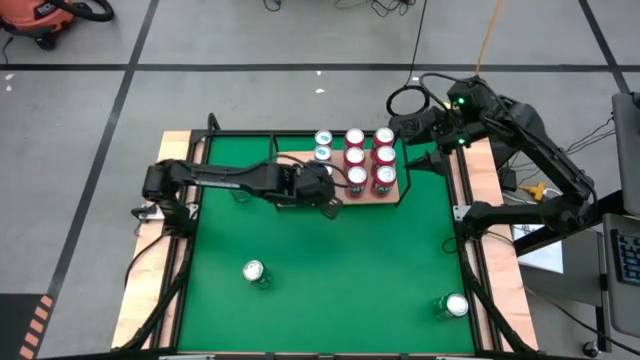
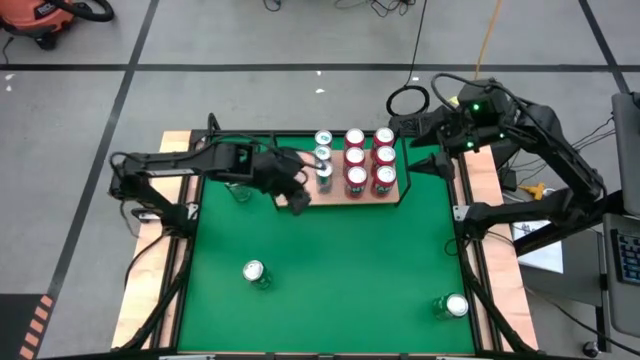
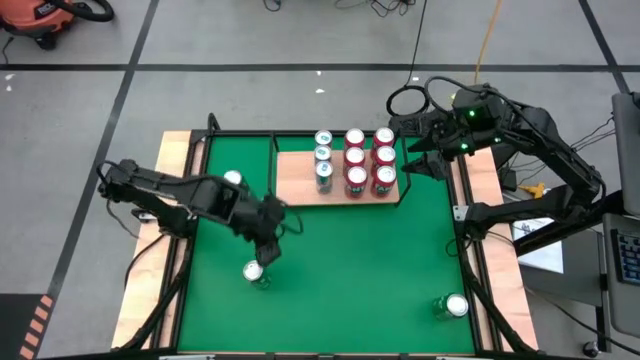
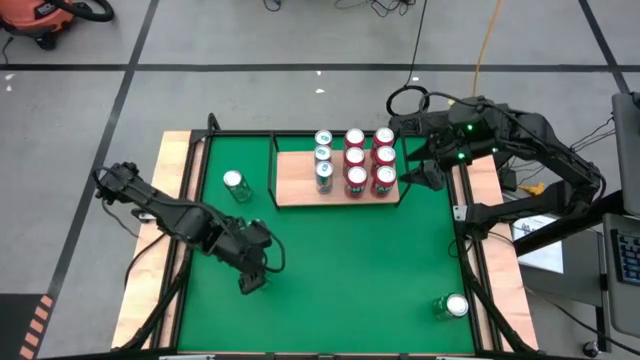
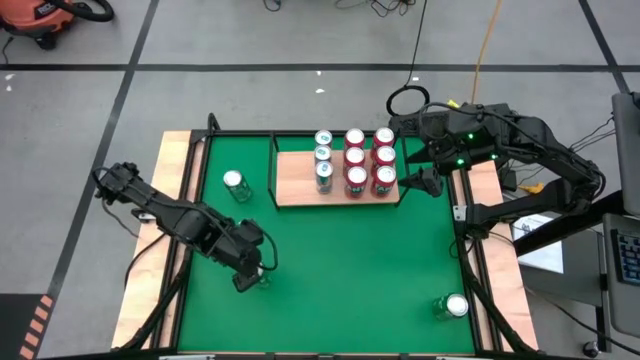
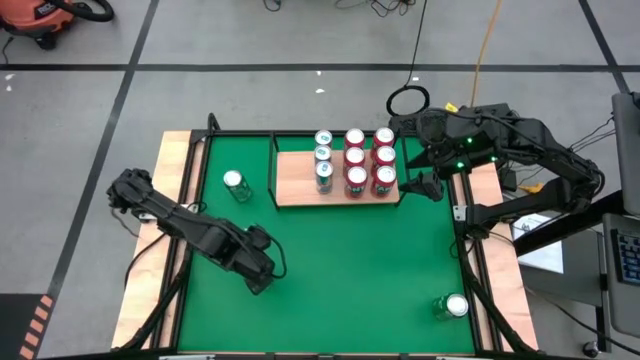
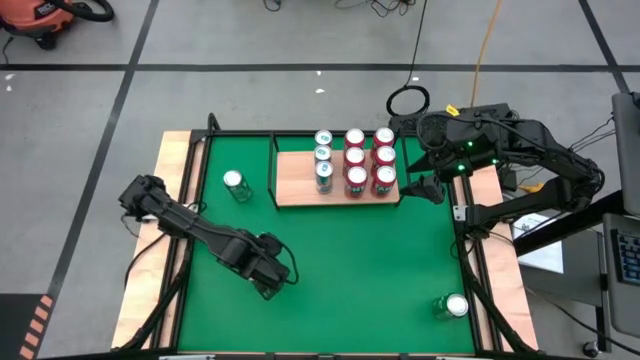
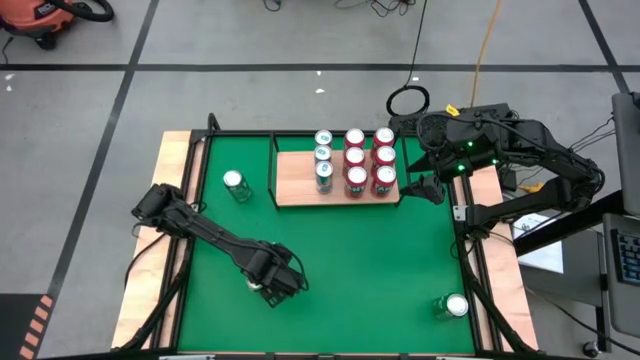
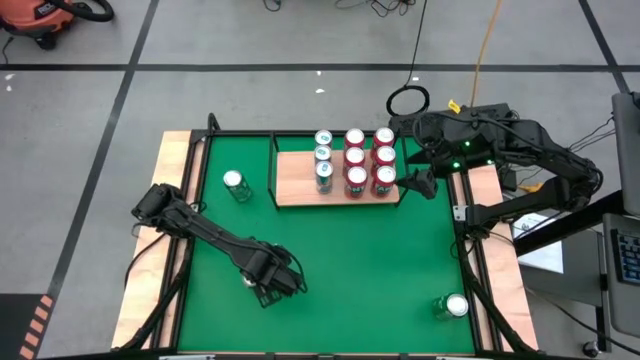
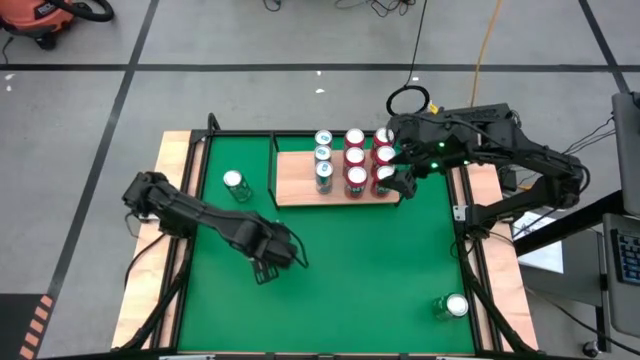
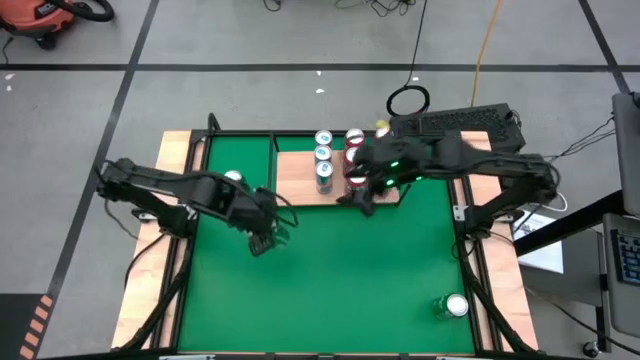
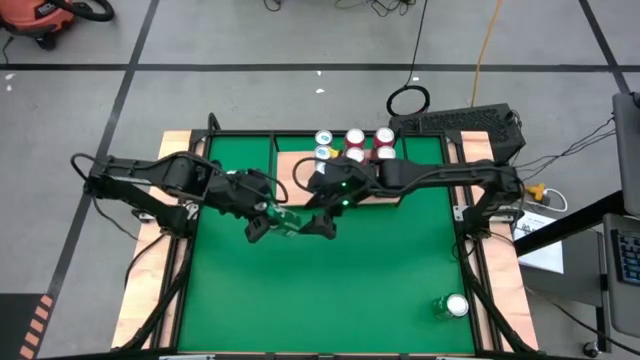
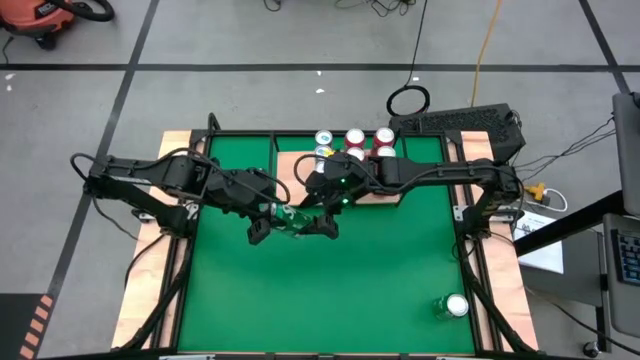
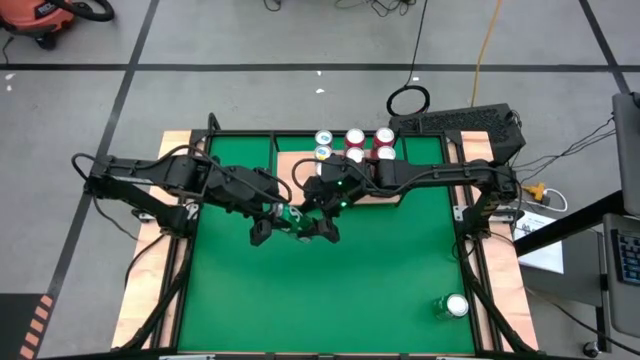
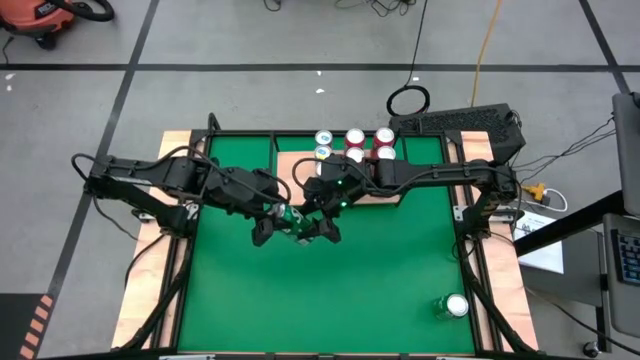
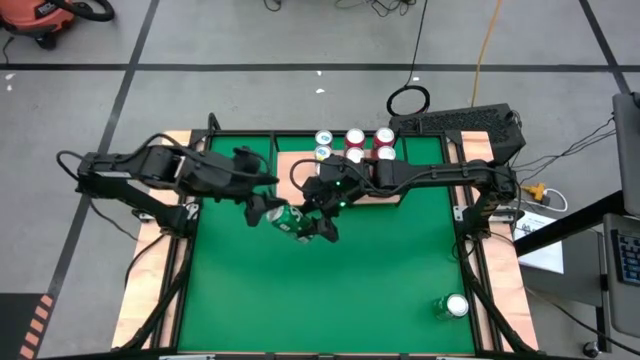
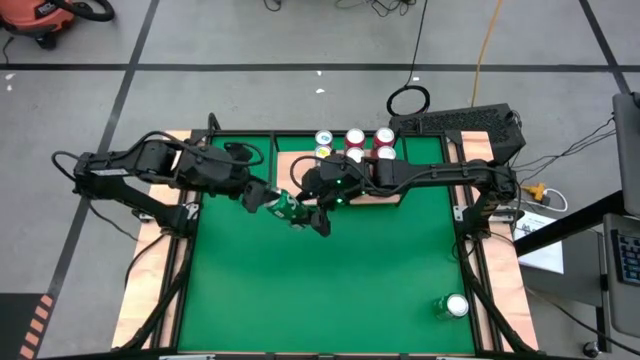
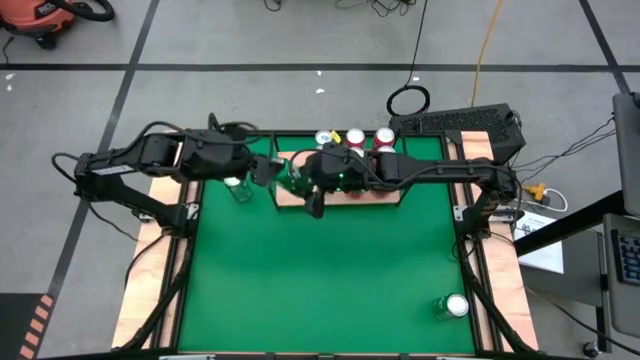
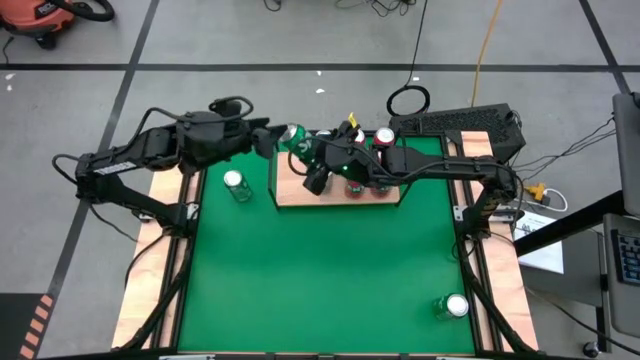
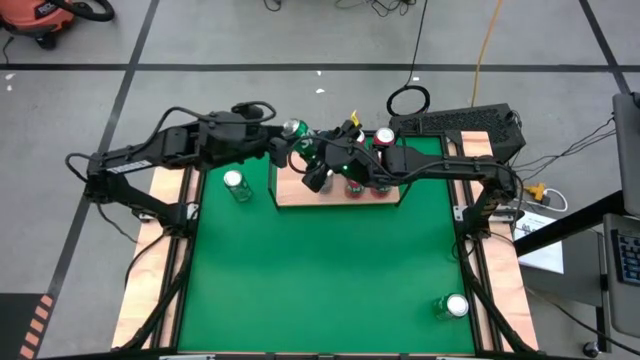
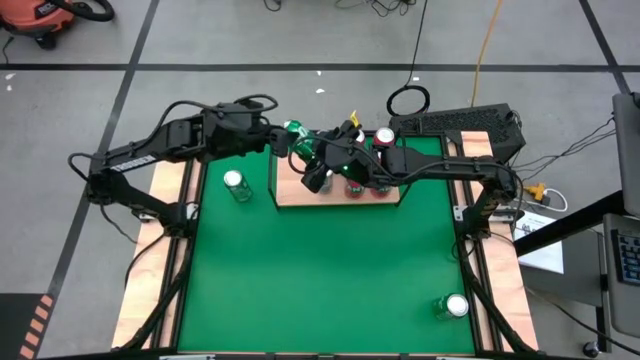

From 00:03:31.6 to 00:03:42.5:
Task: Place canned beverage on shelf
Put the green soda can on the shelf

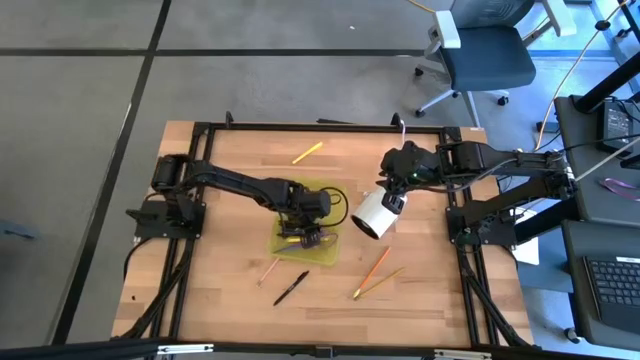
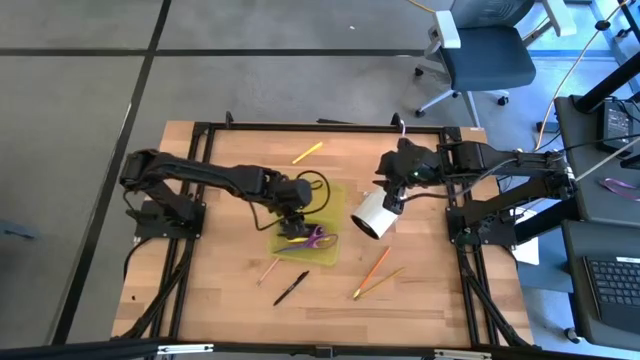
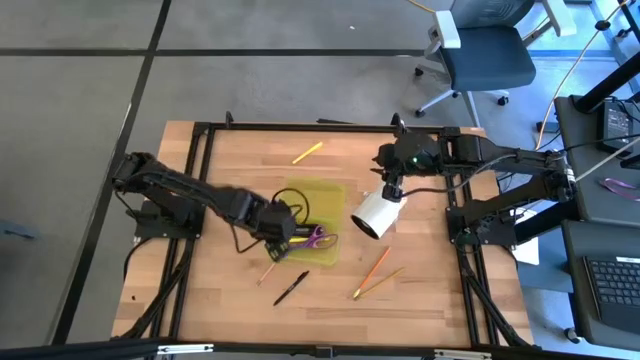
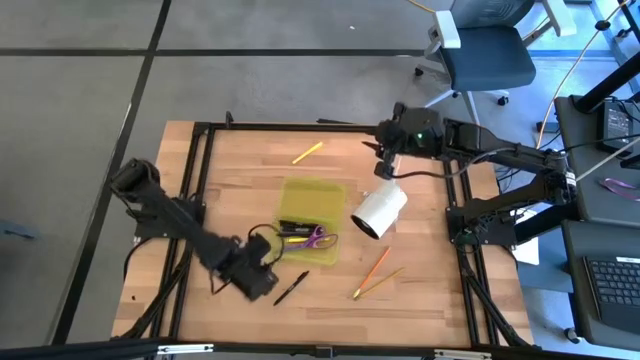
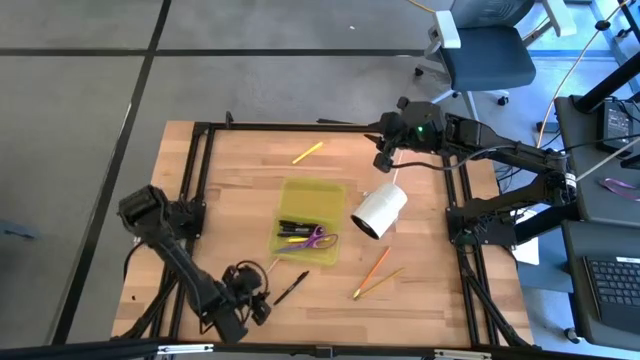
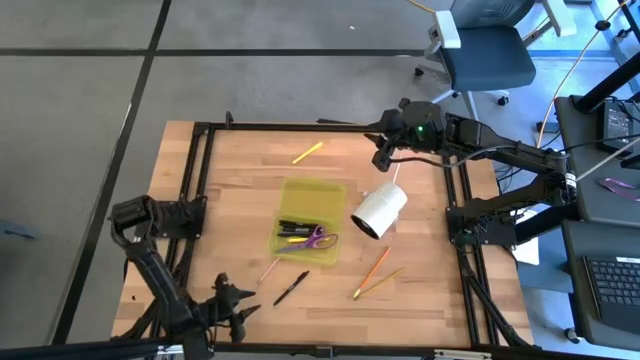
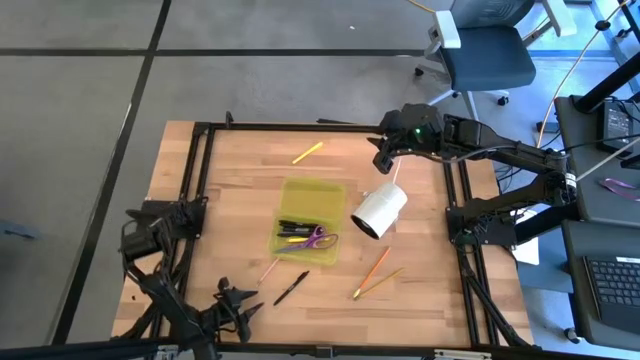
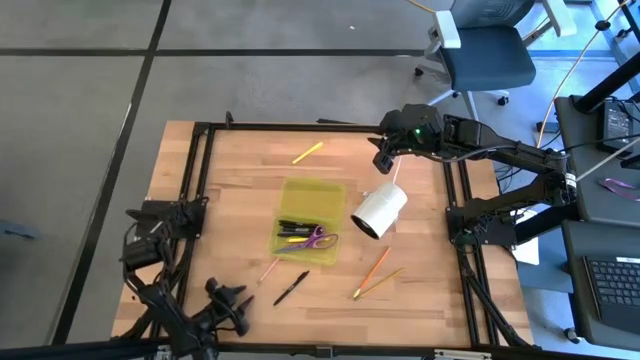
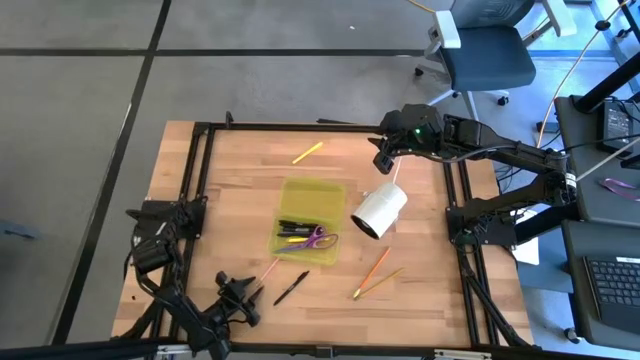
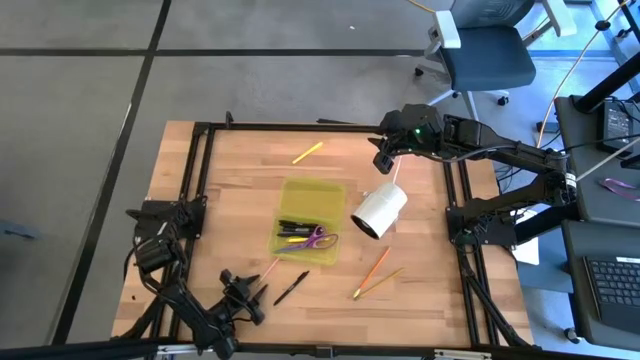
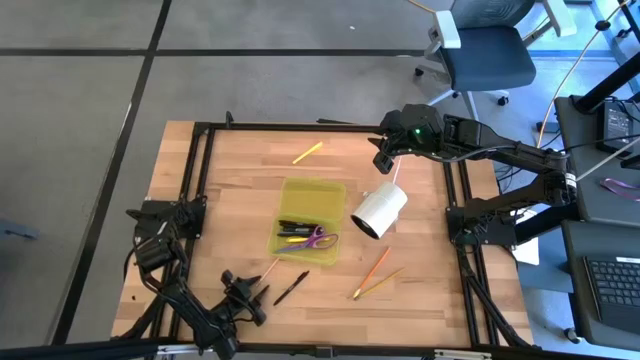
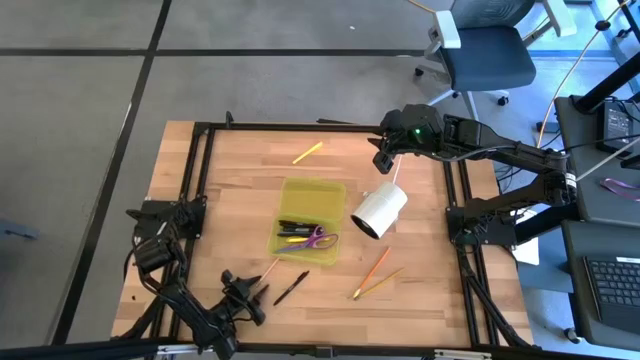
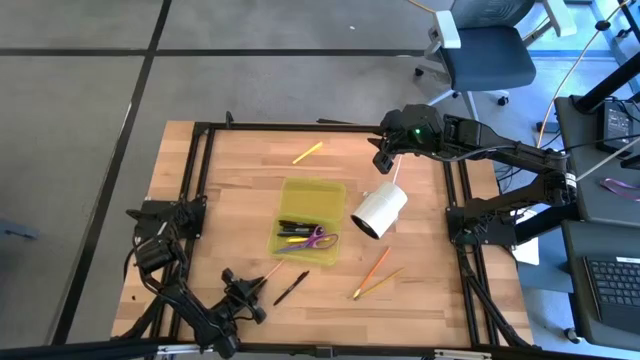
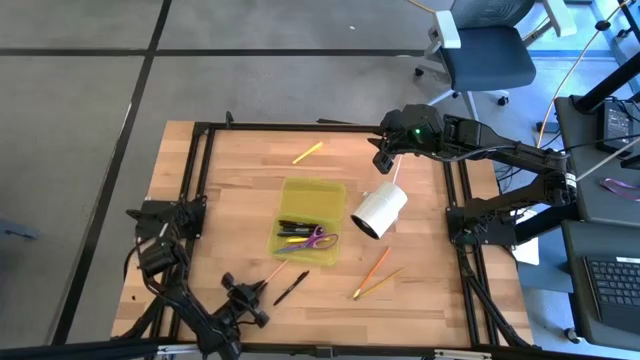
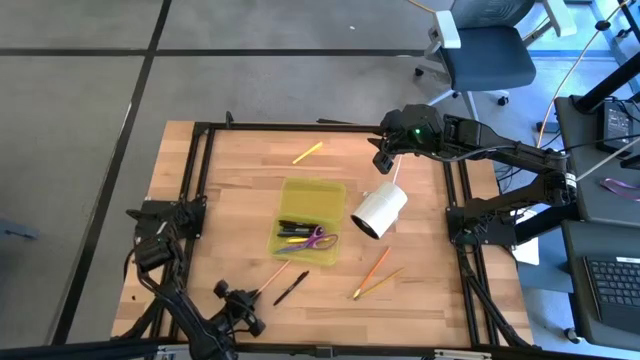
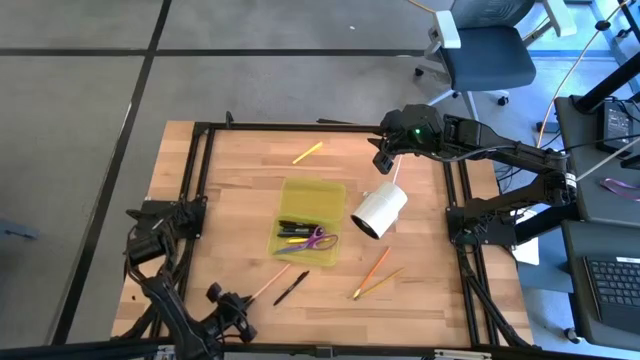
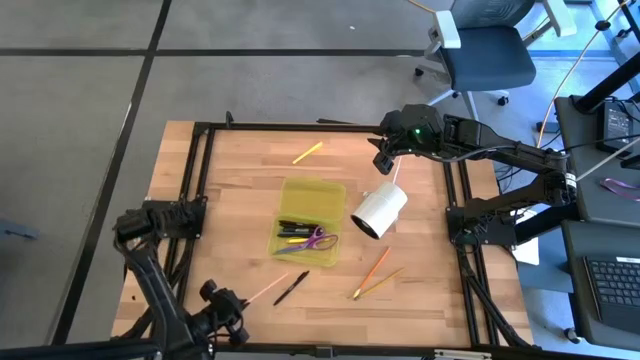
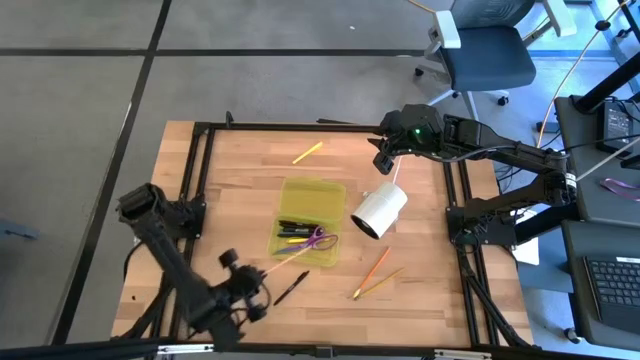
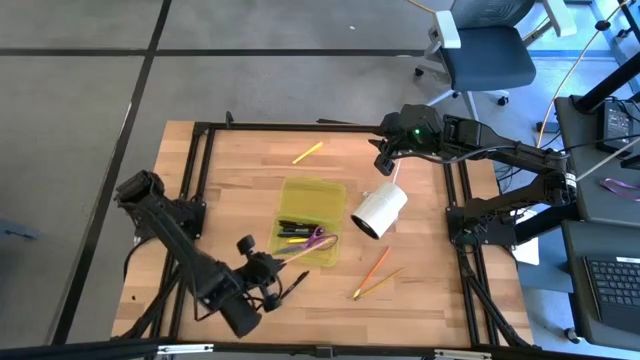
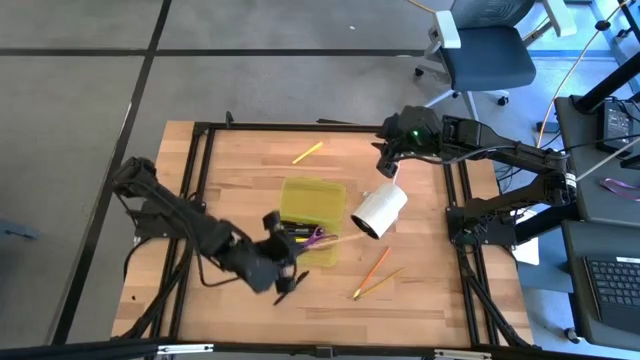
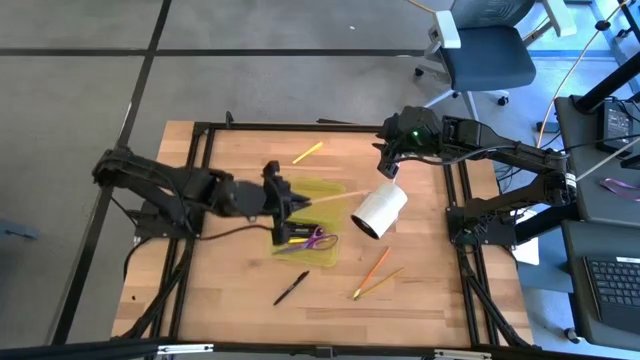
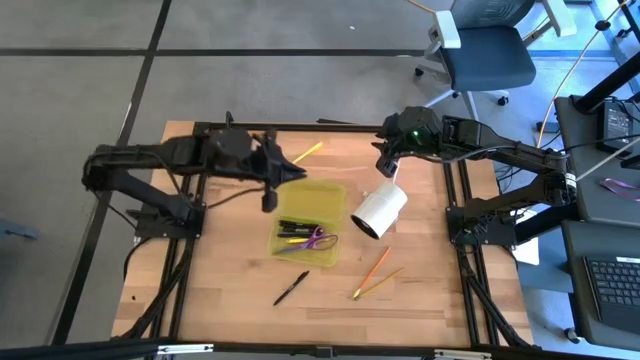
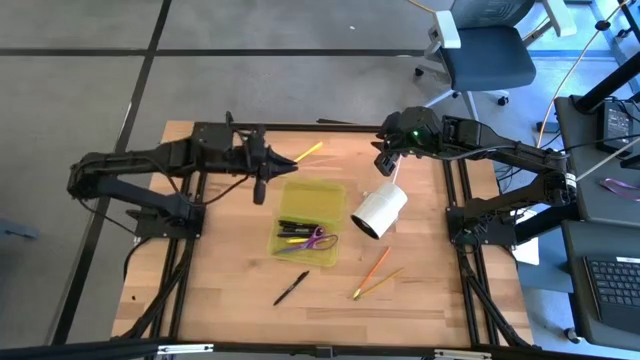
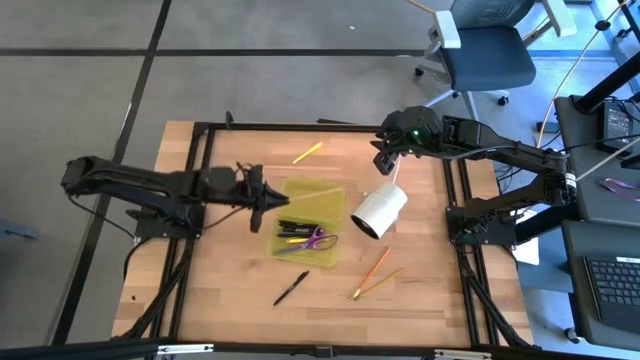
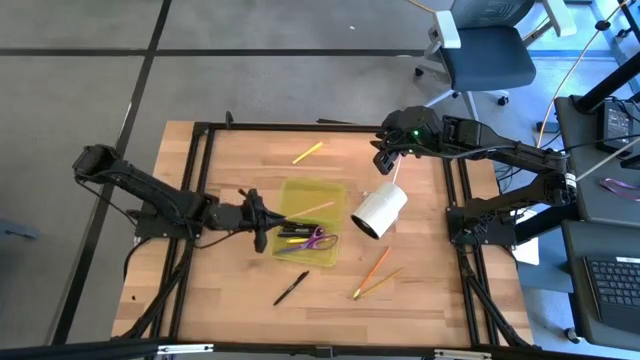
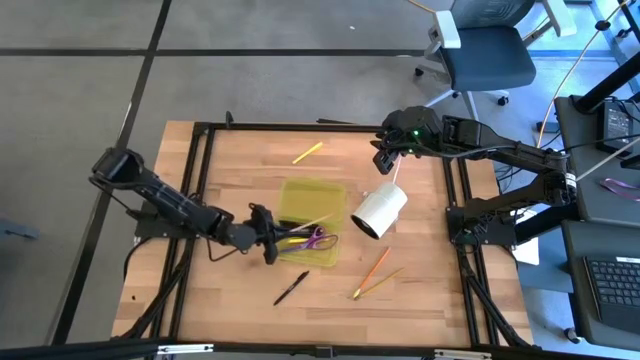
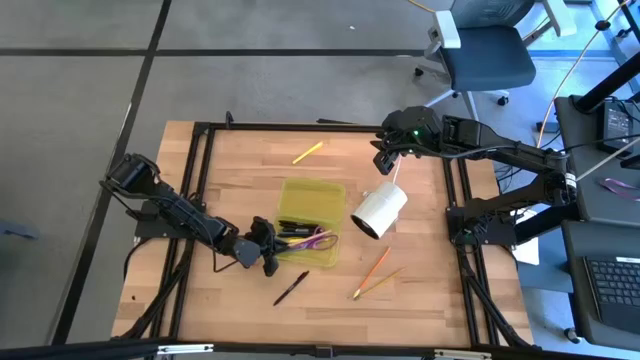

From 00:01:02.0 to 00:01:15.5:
Task: Pick & place school supplies into a supply box
Put the pink pencil into the yellow supply box
